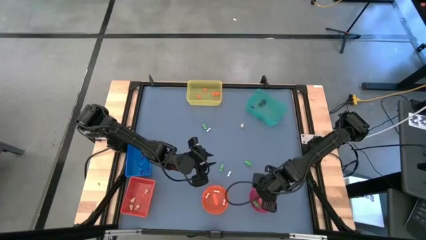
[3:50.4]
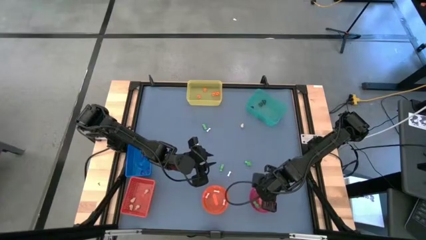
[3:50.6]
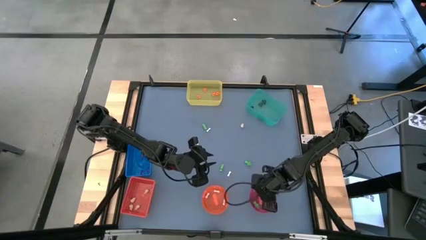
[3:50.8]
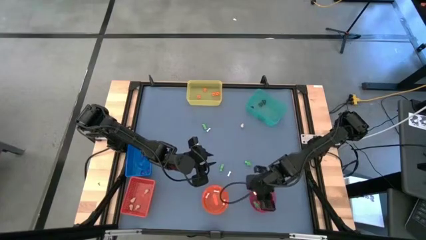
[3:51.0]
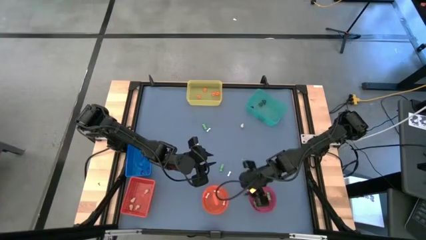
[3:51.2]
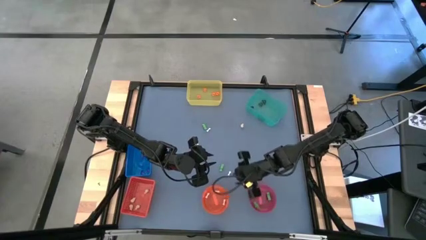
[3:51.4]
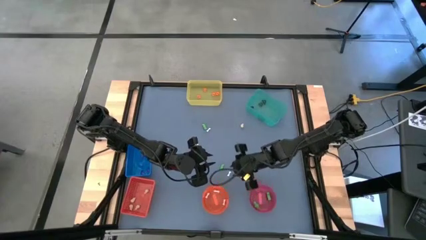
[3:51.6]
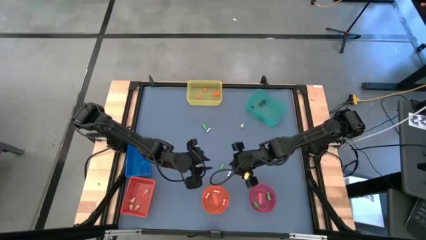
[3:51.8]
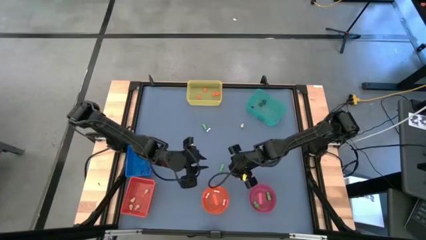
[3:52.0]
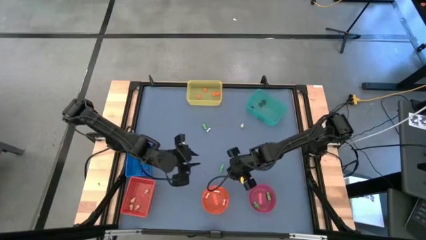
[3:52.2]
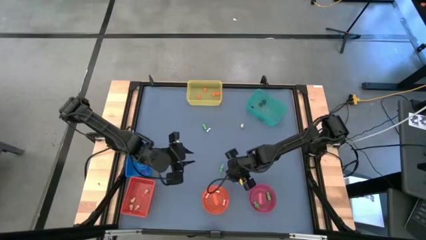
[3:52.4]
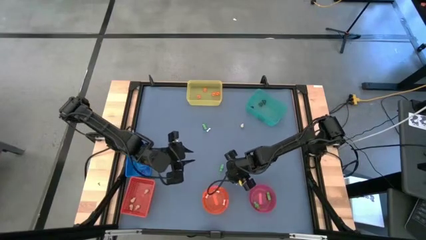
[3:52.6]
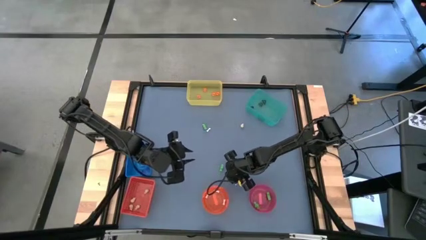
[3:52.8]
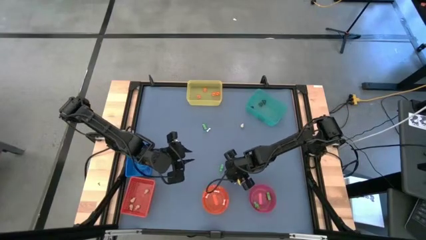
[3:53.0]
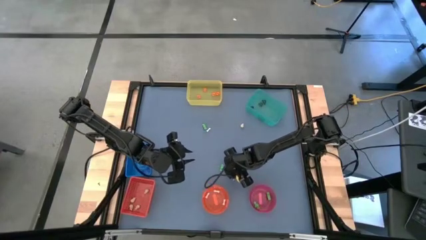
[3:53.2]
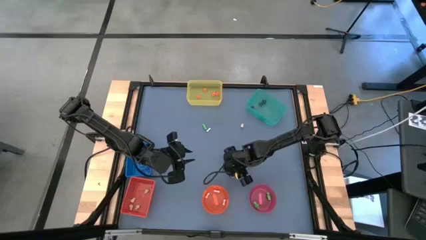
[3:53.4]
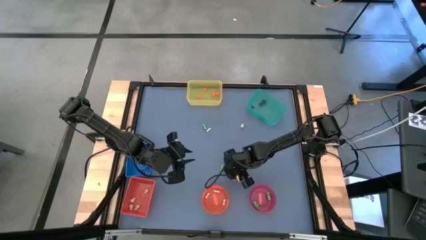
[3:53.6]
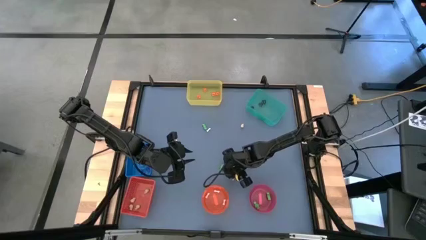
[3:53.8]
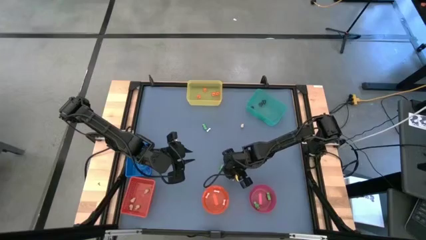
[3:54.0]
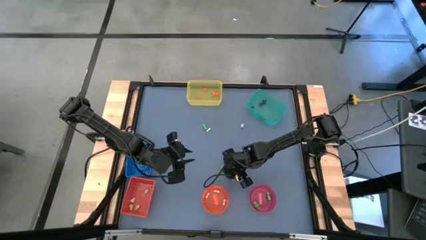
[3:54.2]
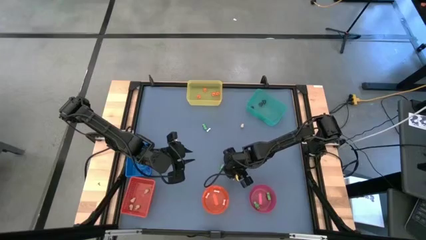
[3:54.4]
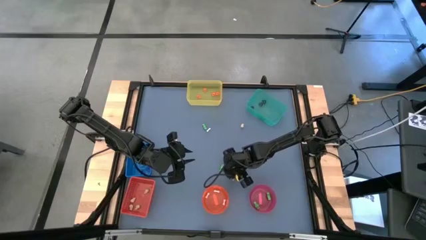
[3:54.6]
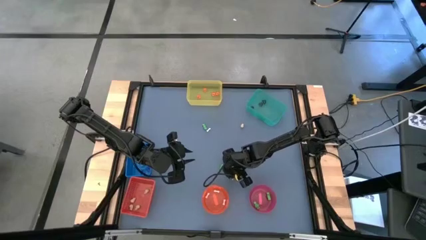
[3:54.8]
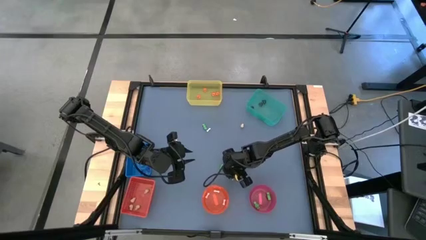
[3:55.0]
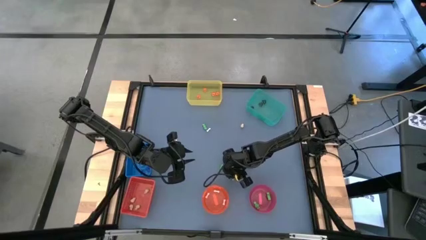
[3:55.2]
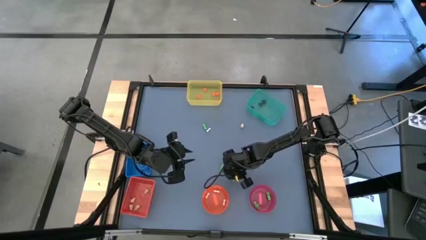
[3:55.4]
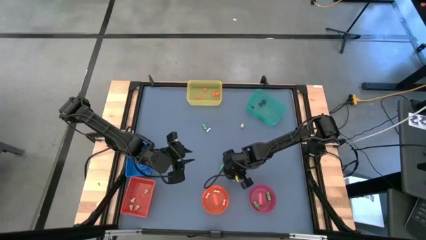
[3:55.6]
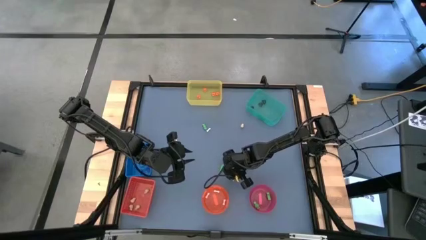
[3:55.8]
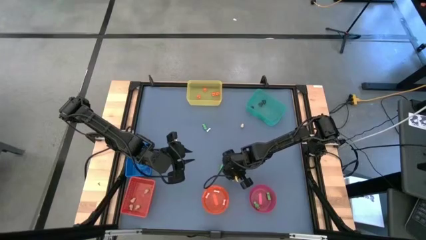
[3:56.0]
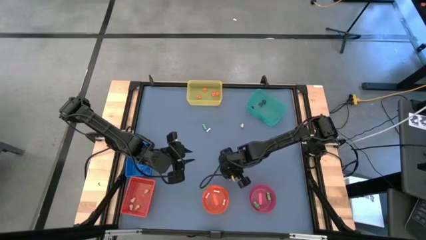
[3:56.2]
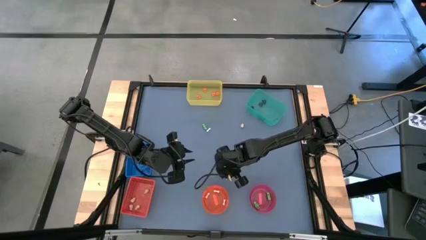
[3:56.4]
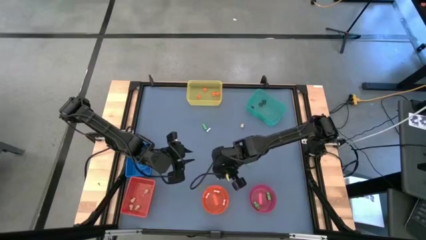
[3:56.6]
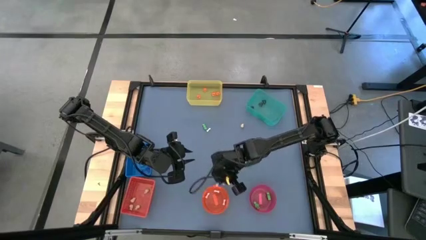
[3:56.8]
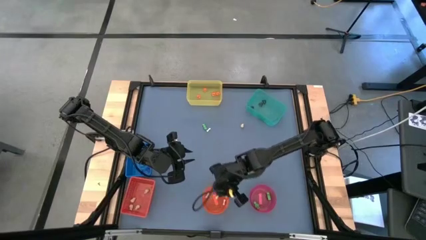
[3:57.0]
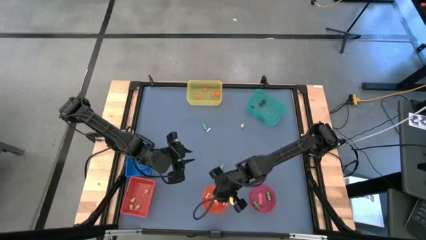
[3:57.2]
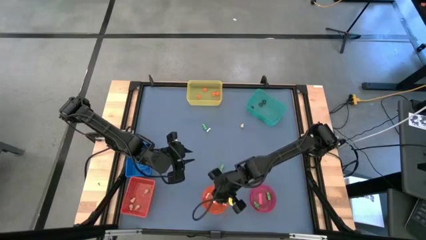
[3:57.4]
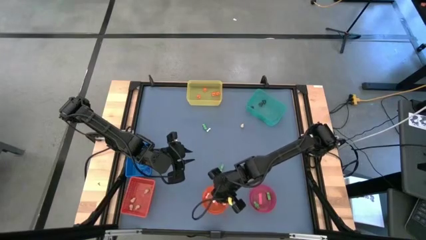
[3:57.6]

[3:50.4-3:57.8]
Task: Sort Halloween decoration
Put the white bone toy into the orange bowl

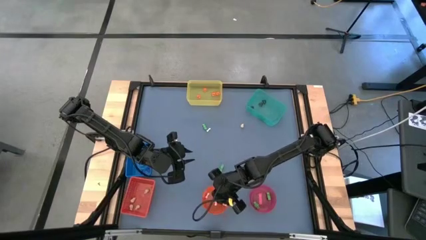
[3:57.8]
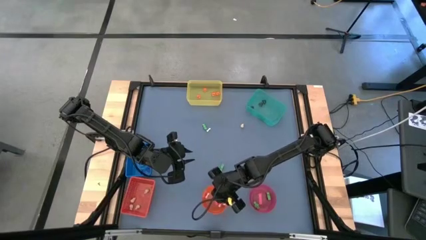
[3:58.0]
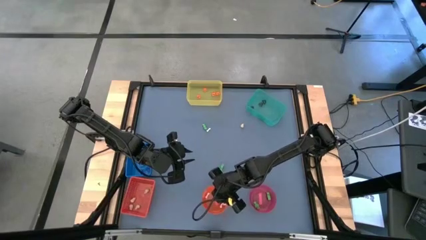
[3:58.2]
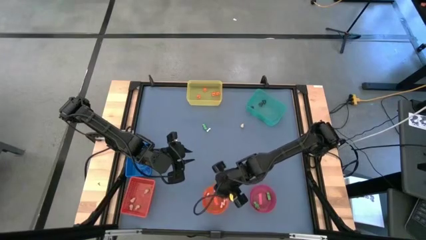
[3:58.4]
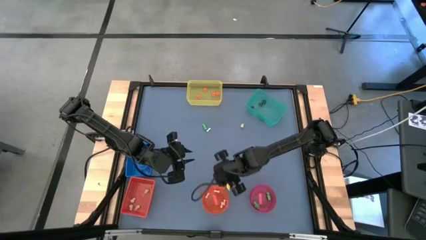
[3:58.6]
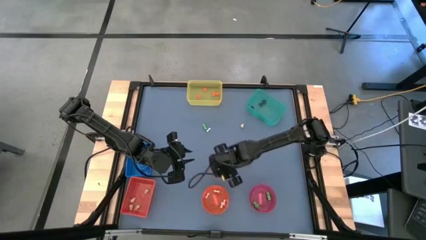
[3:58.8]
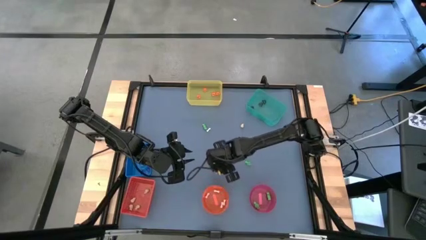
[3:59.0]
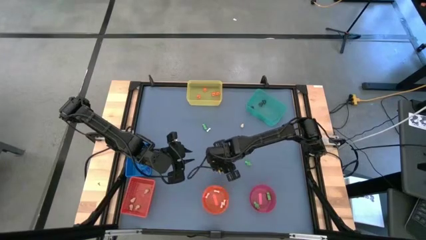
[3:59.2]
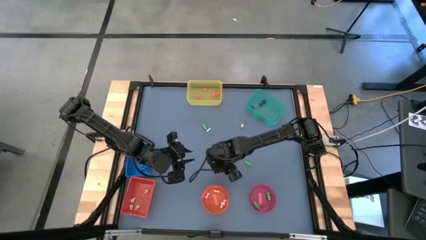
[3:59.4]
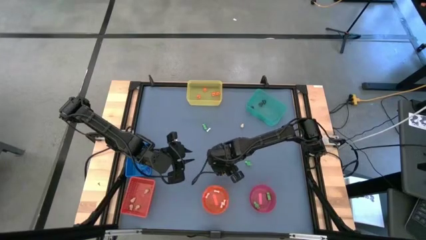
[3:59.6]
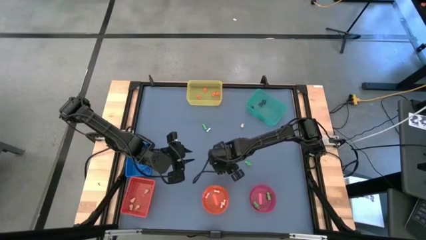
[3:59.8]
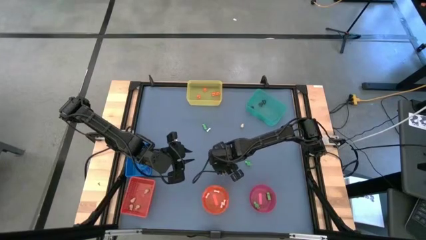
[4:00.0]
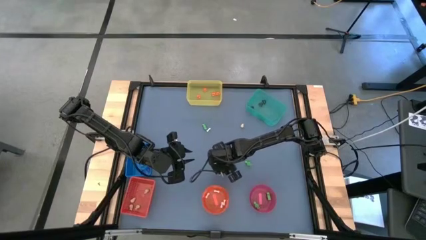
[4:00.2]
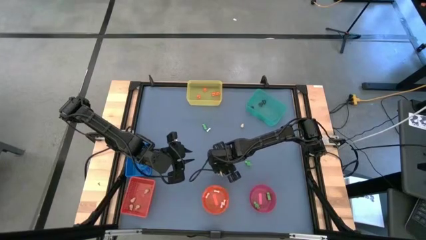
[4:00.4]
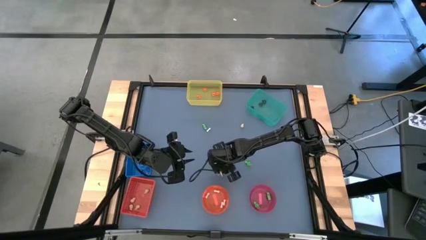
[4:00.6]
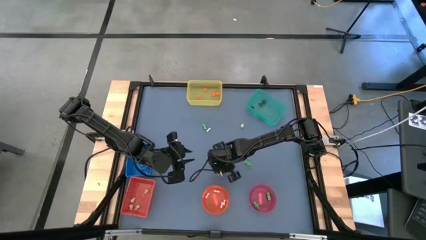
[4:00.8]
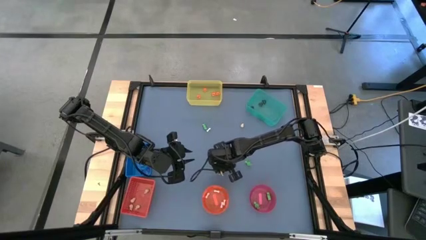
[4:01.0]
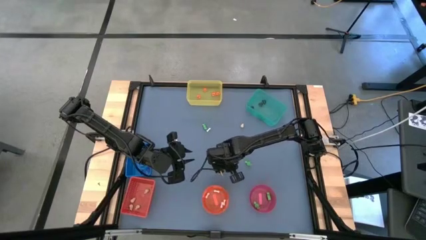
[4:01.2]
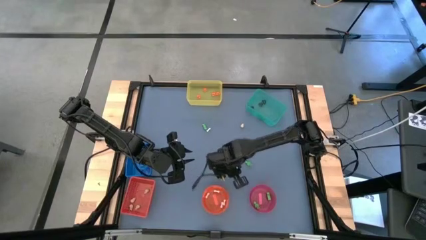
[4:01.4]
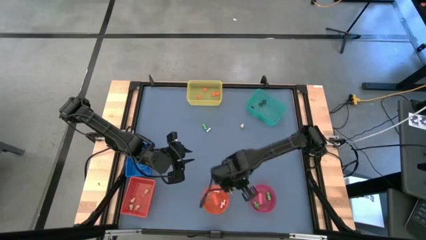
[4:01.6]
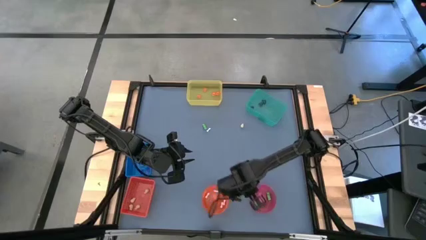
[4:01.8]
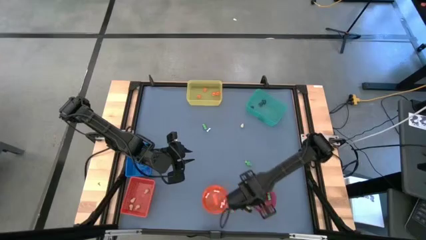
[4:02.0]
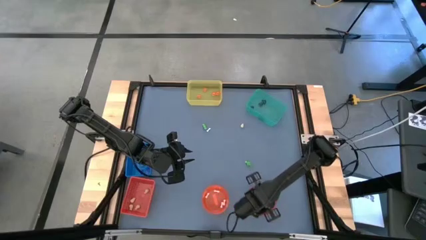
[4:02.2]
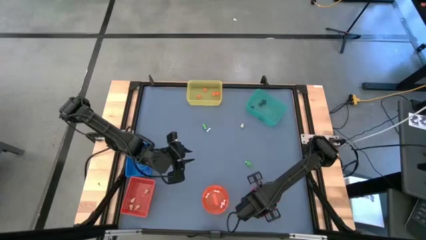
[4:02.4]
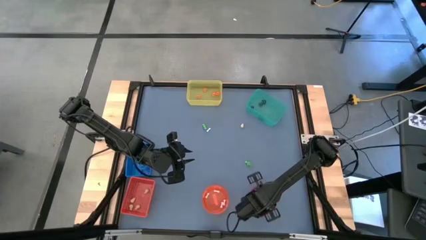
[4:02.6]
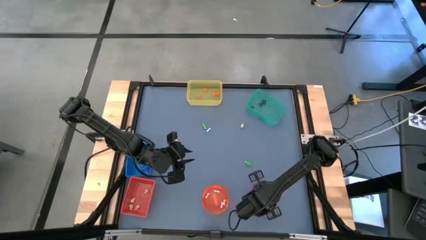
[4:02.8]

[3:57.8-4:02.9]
Put the green skeleton toy into the pink bowl
